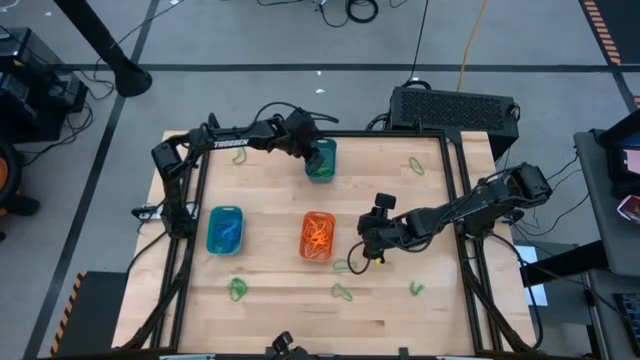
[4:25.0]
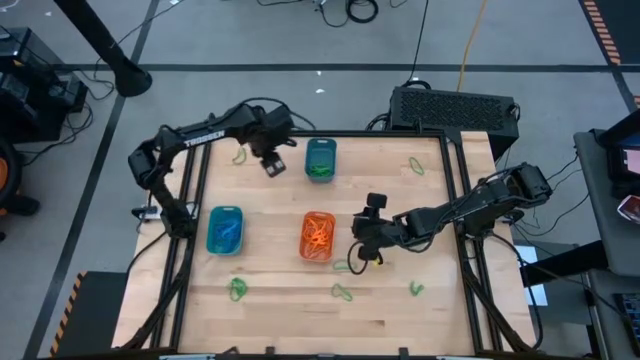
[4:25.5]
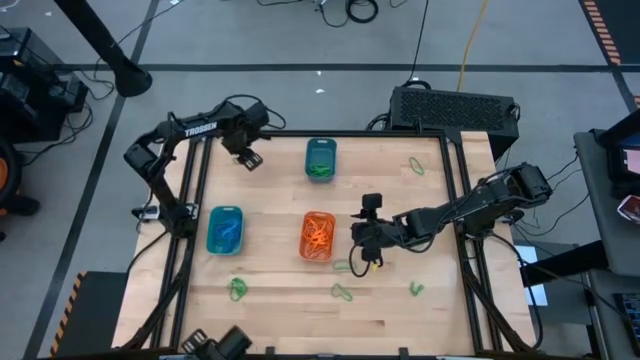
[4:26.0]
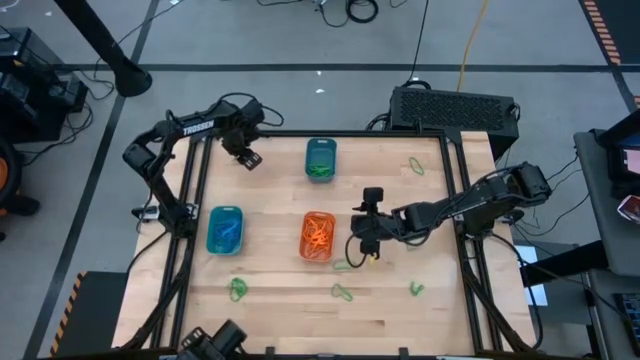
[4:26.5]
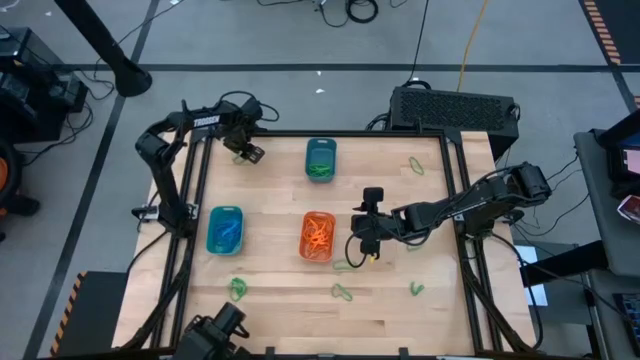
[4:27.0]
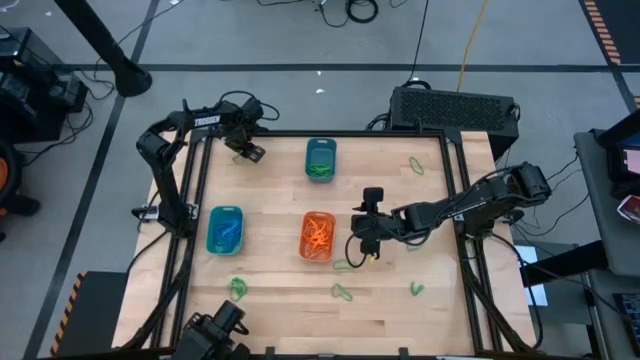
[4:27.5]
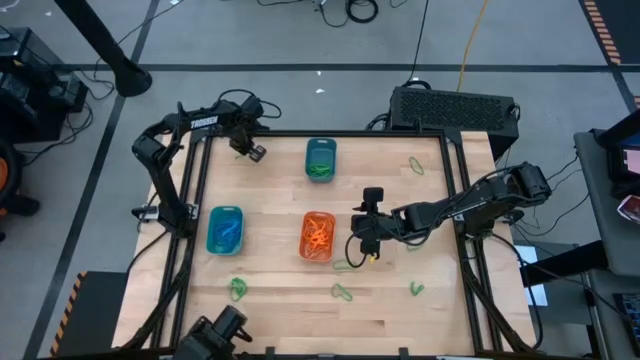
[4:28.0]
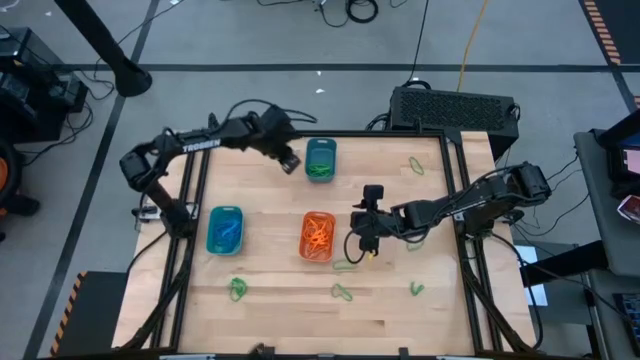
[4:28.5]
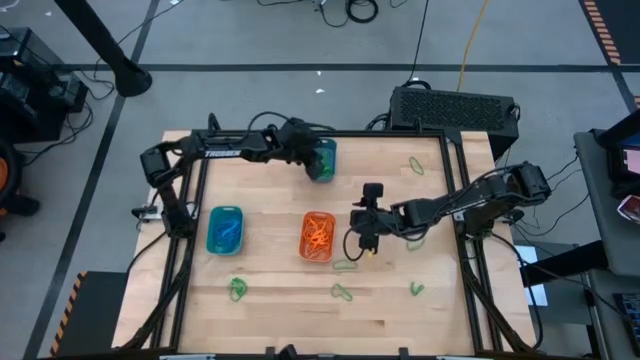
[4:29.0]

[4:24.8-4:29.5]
Task: Sort rubber bands into baskets
Put the green rubber band into the blue bin

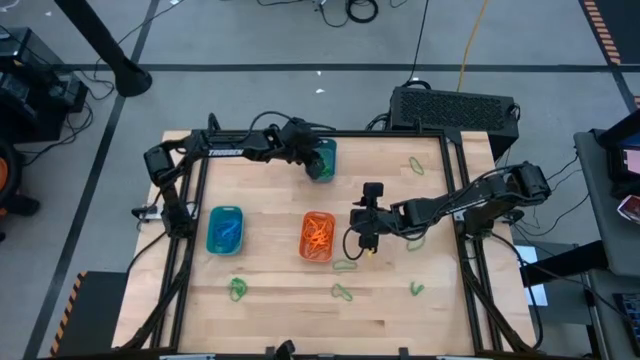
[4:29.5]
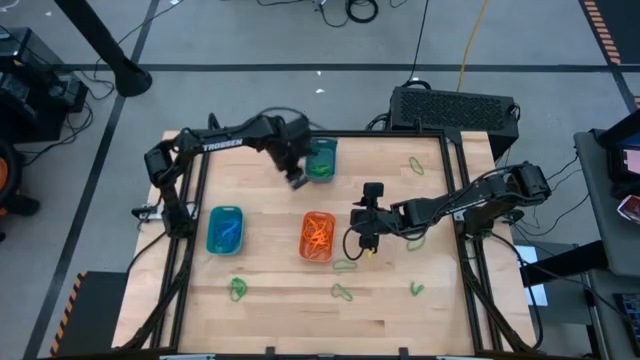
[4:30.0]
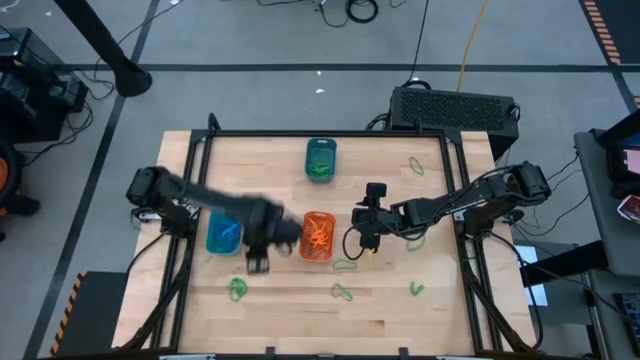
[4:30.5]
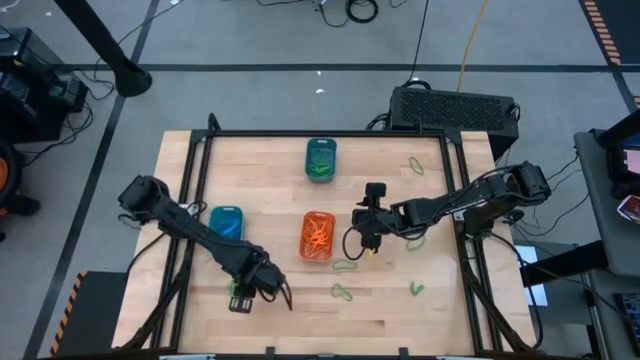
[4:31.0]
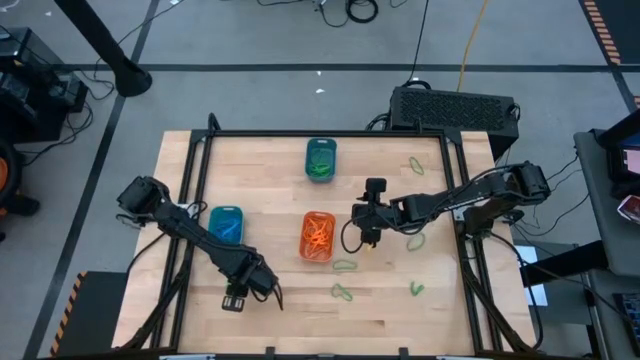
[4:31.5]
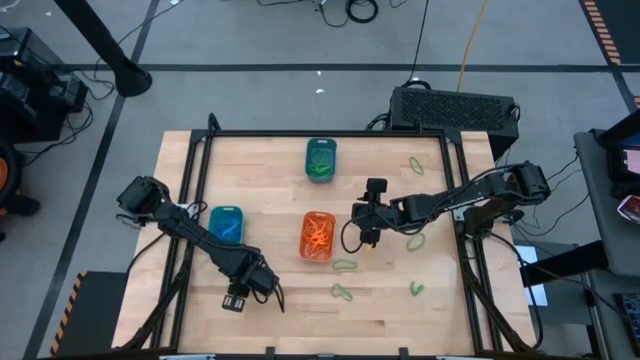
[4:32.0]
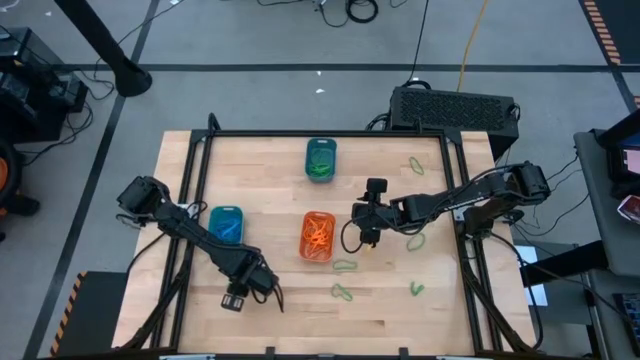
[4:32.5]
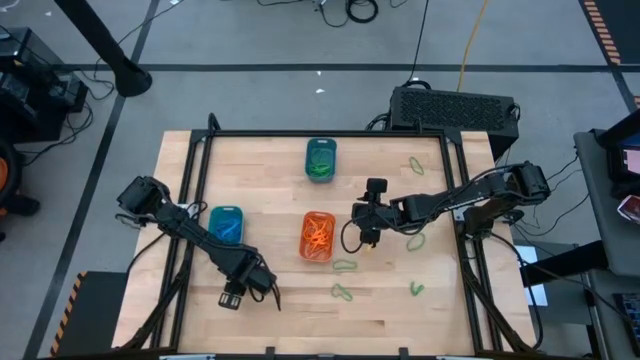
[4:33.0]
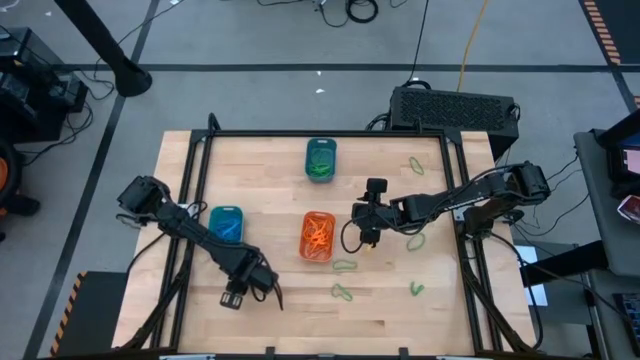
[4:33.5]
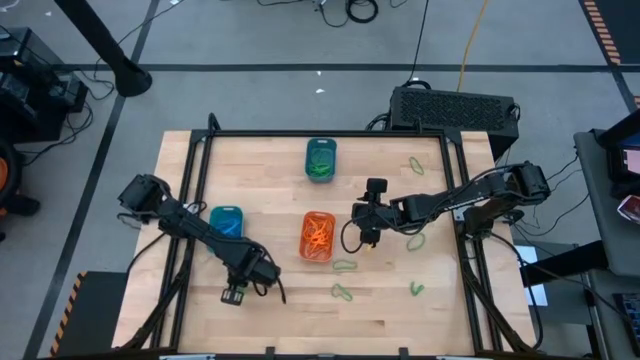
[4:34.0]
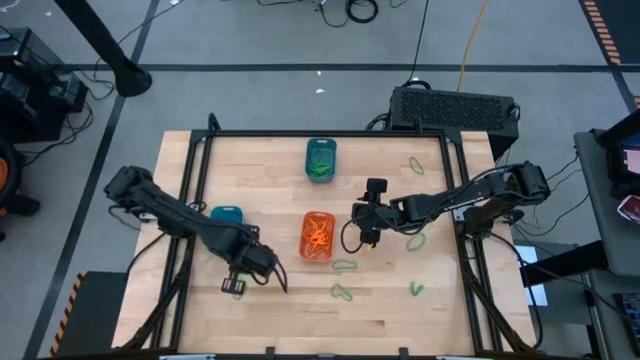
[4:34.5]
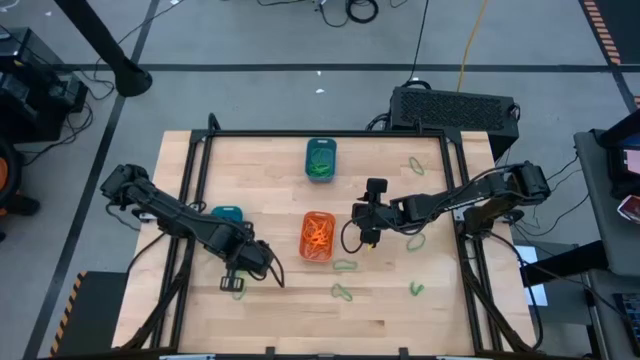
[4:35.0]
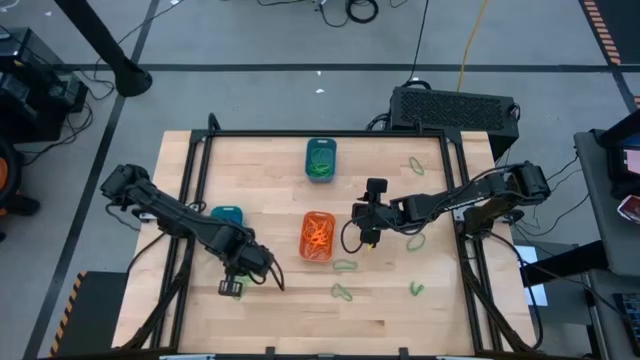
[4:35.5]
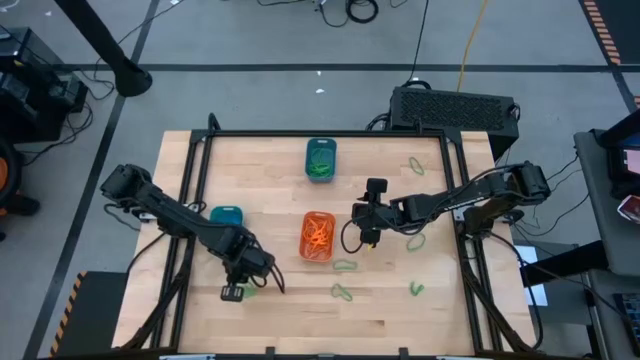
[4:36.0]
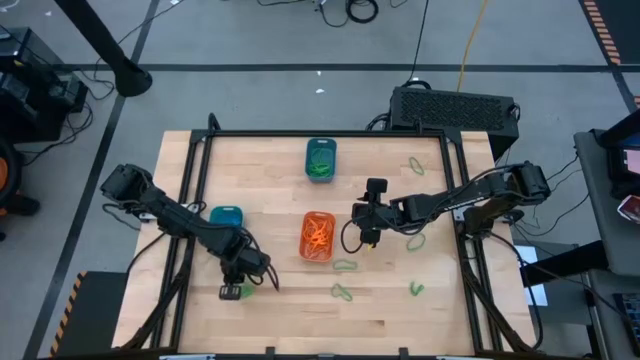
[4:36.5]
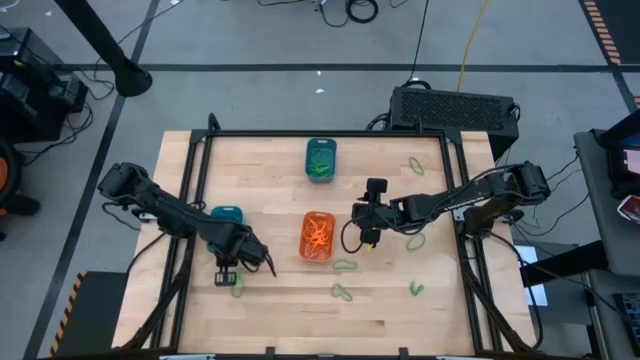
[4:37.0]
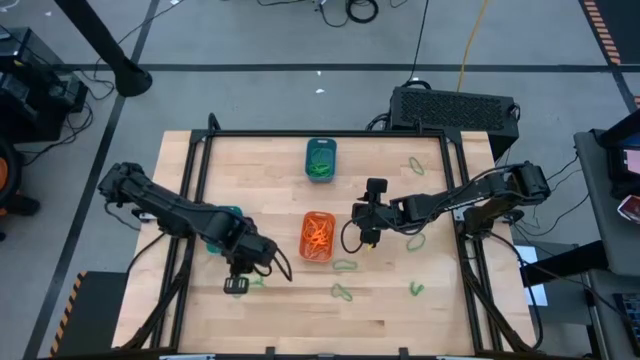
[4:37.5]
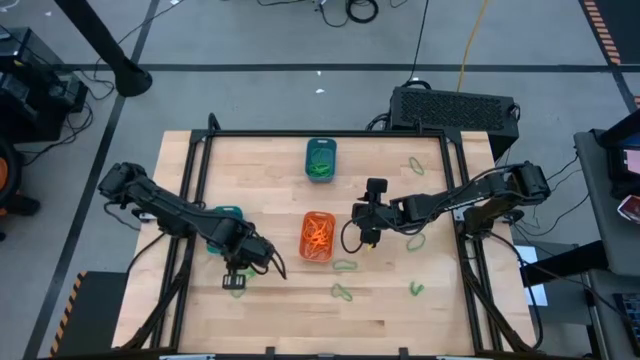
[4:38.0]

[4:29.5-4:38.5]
Put the green rubber band into the blue bin

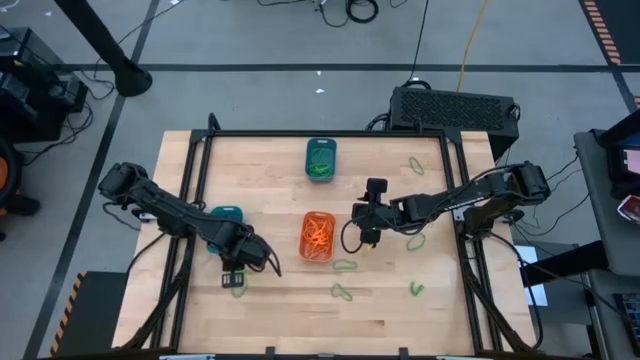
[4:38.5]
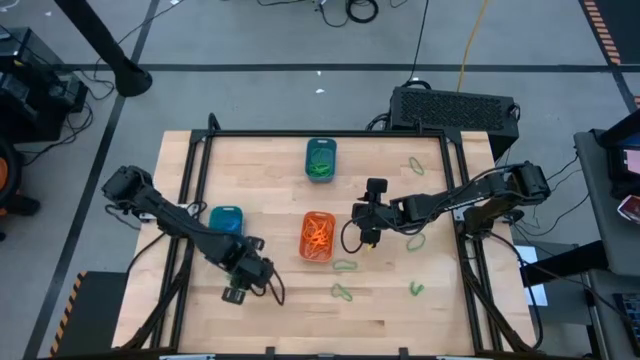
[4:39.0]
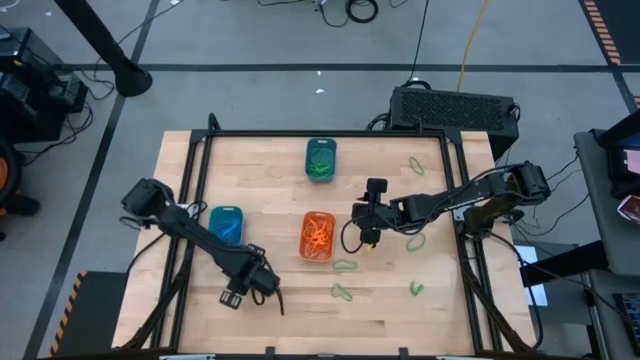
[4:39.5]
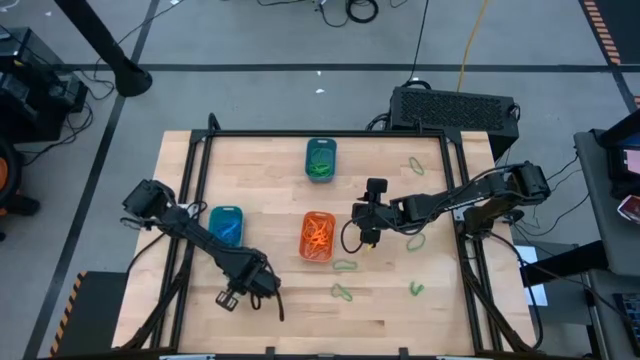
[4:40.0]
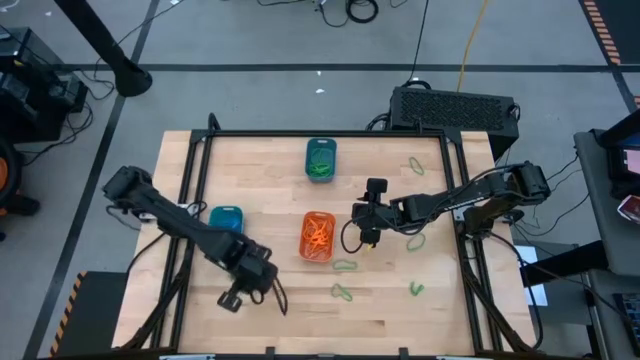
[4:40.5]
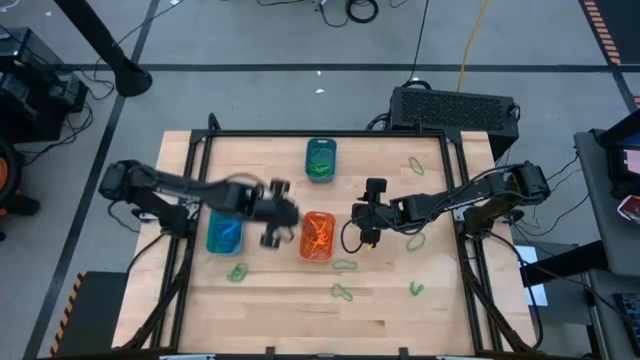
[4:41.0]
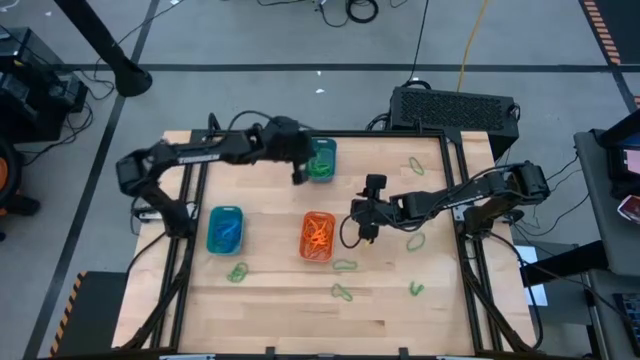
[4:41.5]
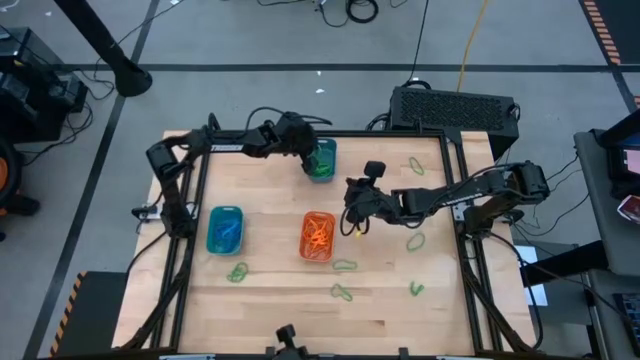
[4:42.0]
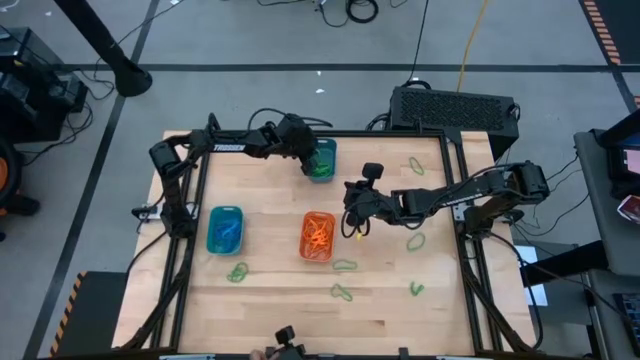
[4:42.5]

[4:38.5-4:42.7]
Put the green rubber band into the blue bin

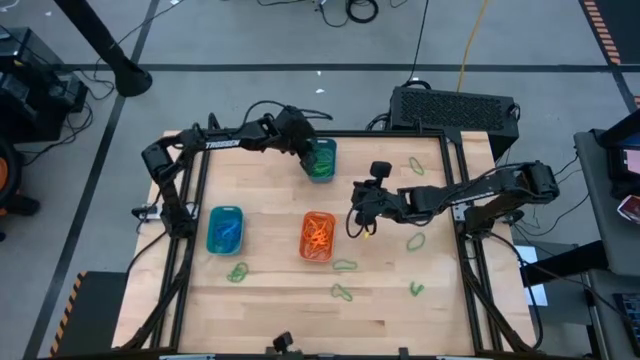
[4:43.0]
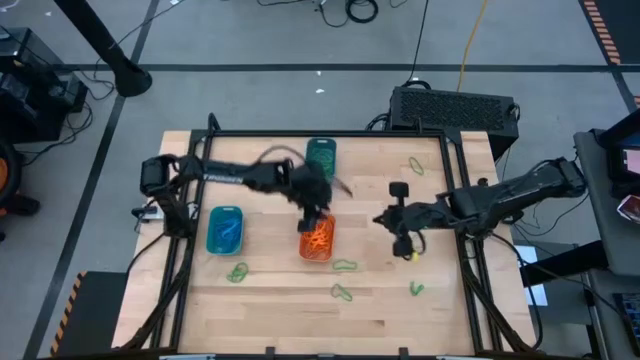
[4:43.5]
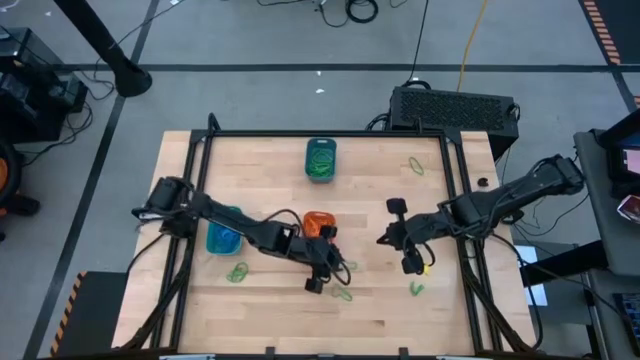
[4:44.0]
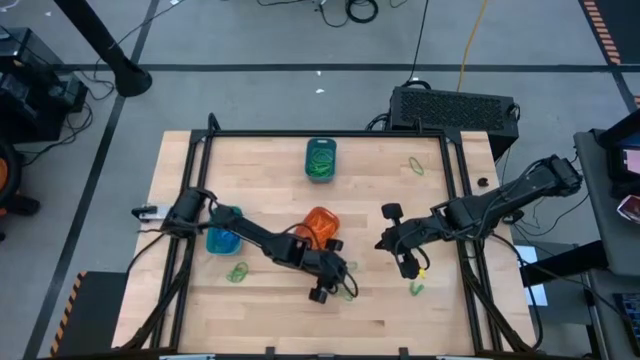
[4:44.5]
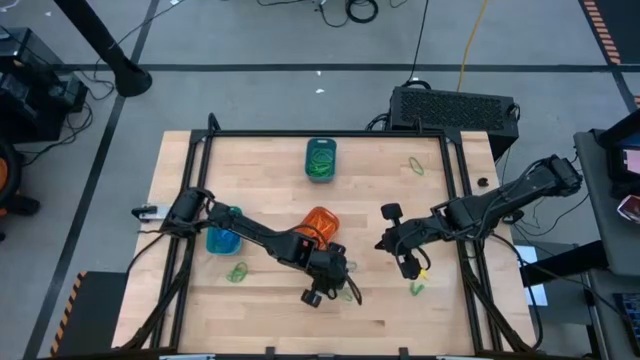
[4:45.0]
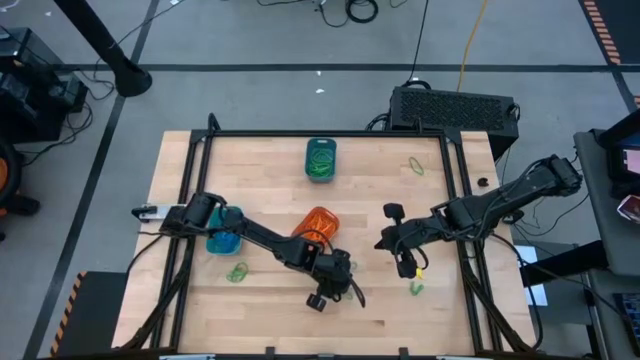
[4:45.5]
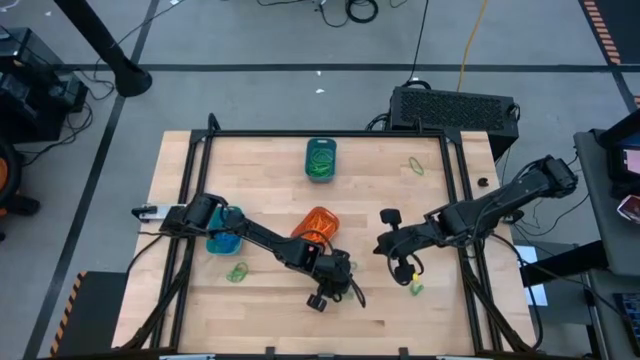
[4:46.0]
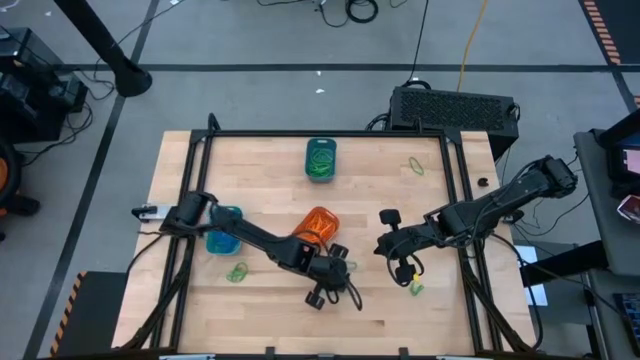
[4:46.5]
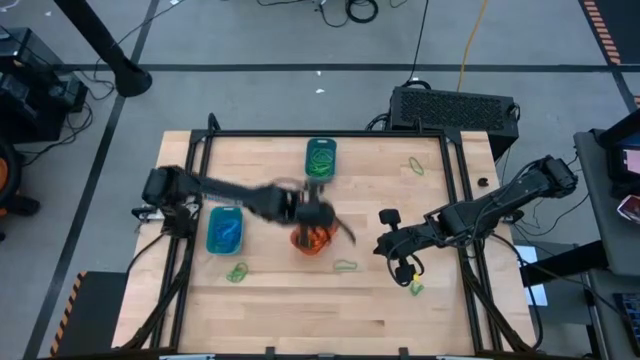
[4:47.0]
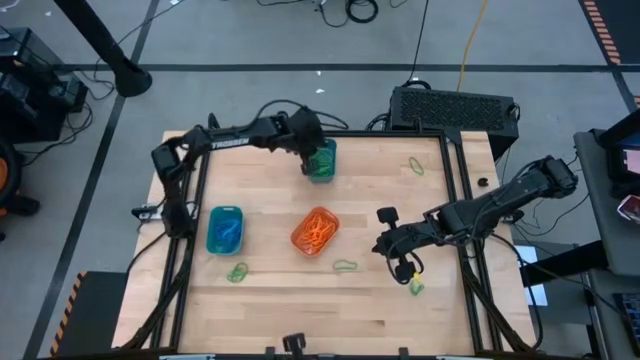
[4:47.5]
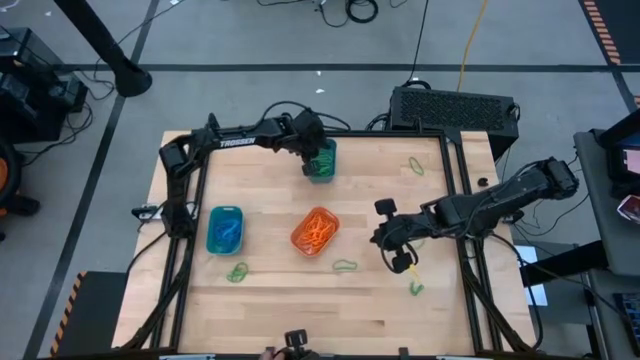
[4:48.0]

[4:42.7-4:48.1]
Put the green rubber band into the blue bin
